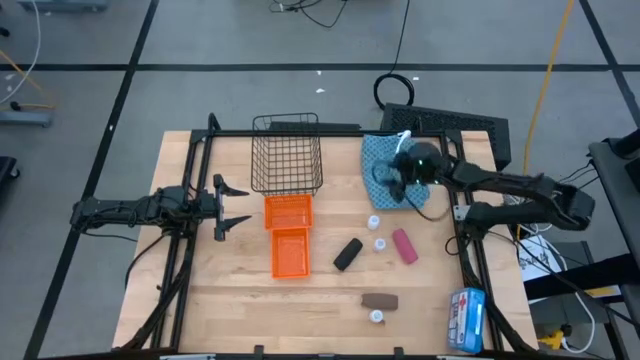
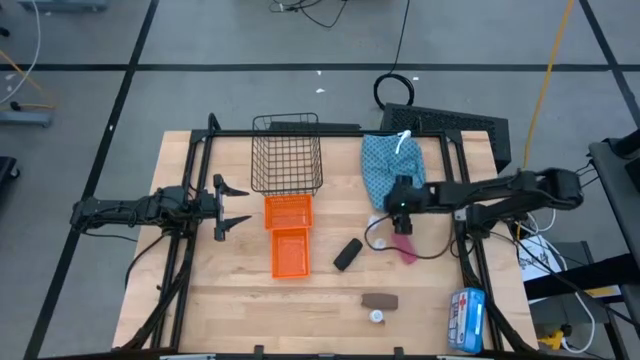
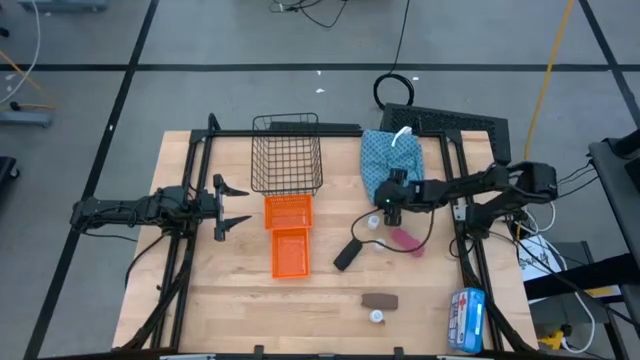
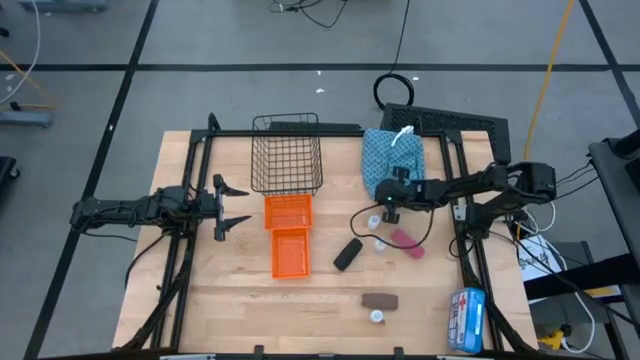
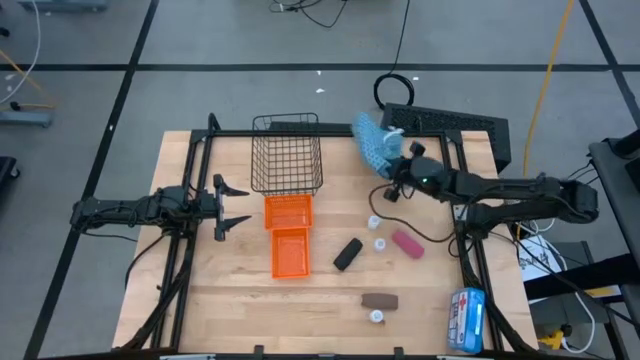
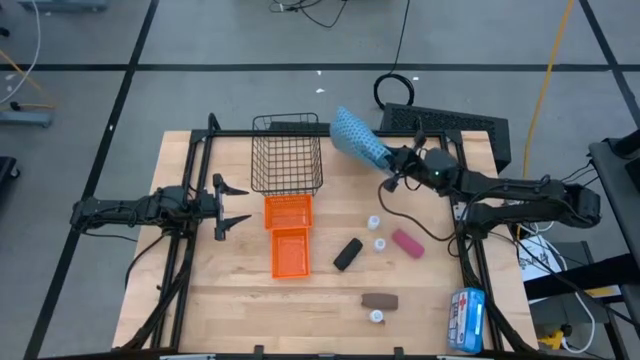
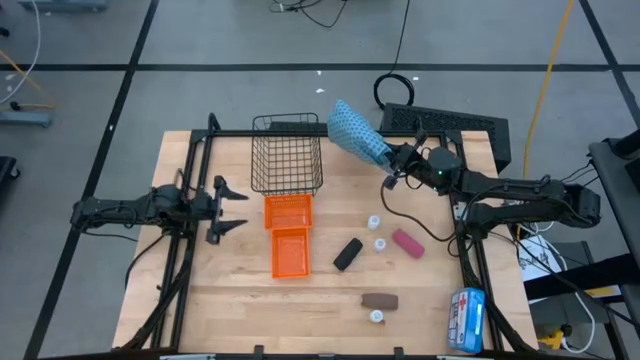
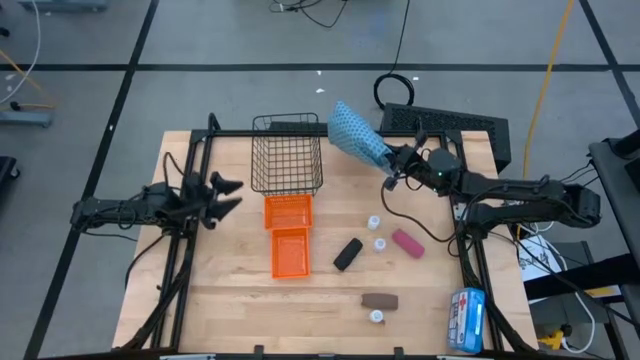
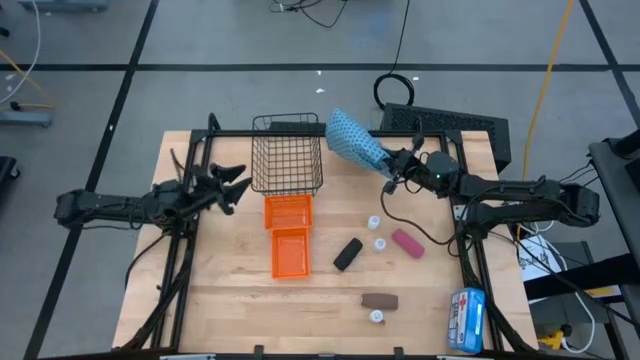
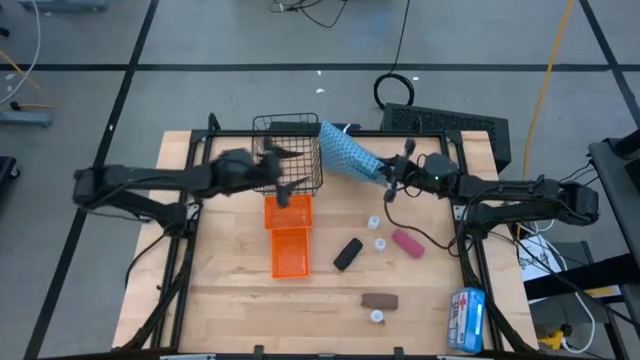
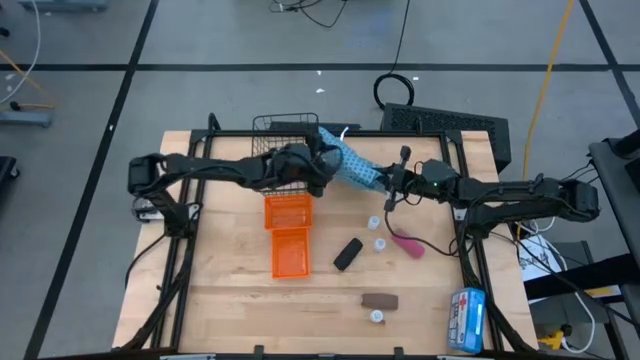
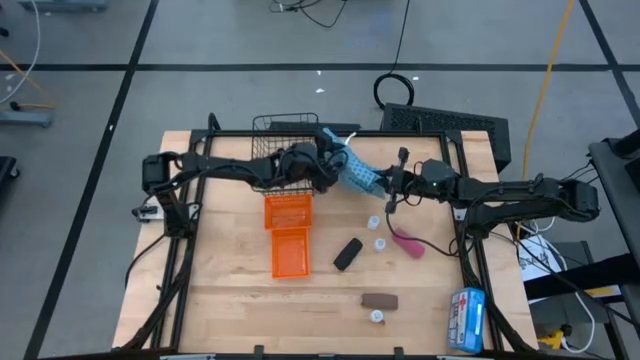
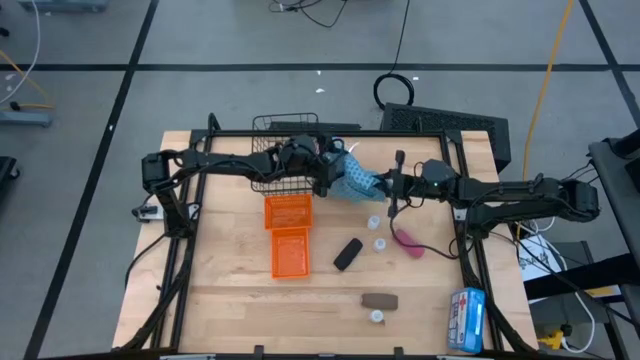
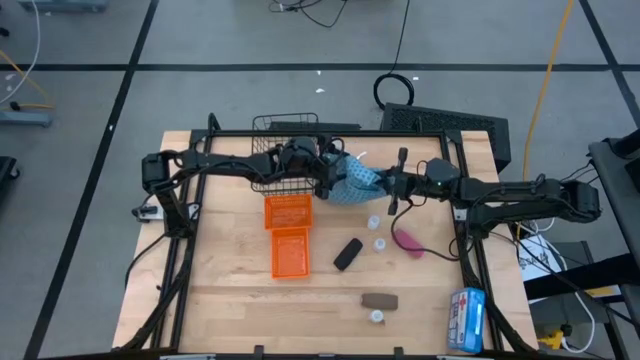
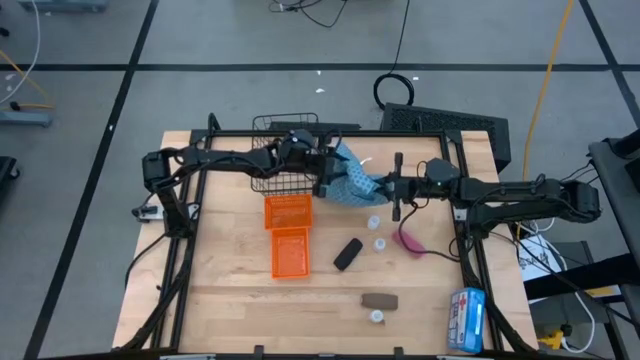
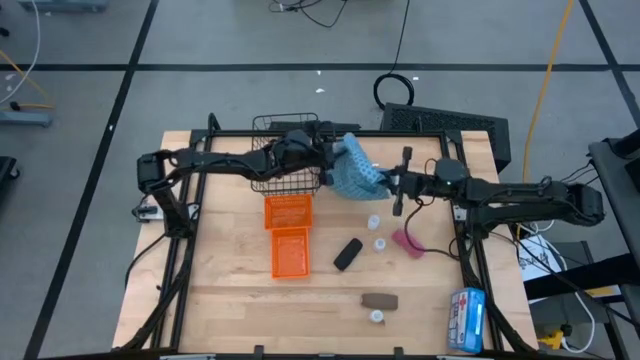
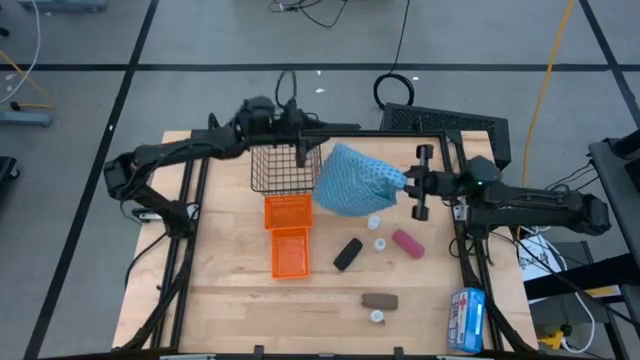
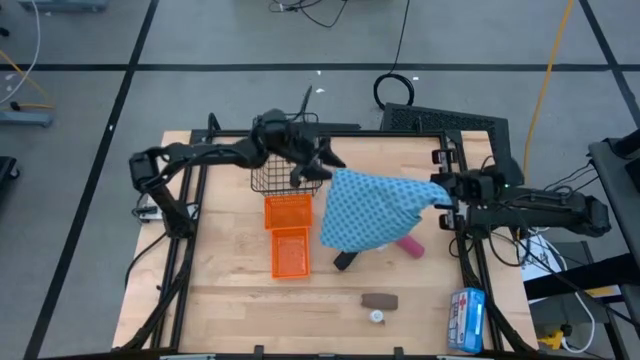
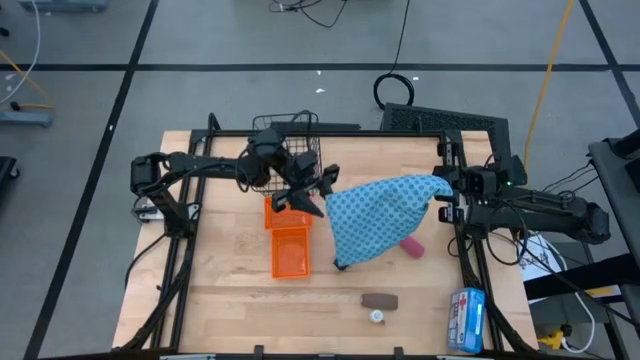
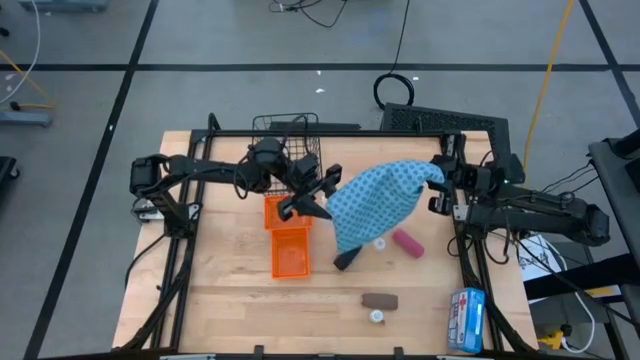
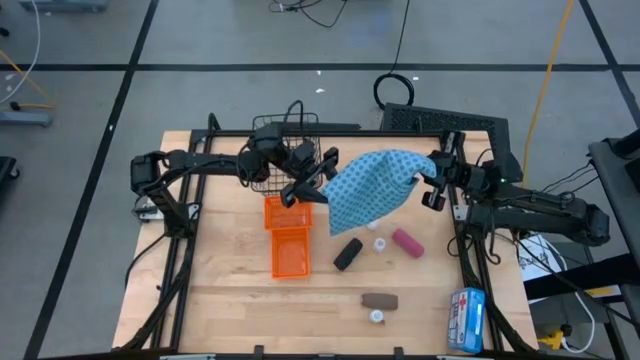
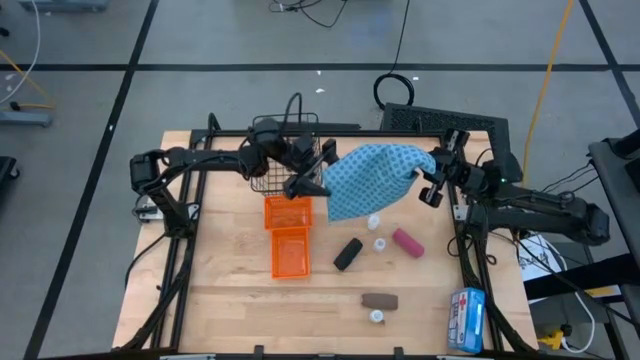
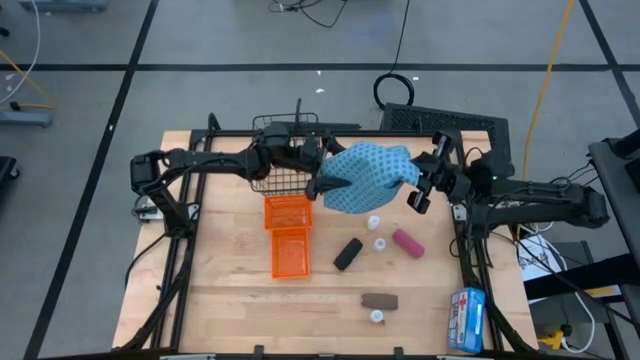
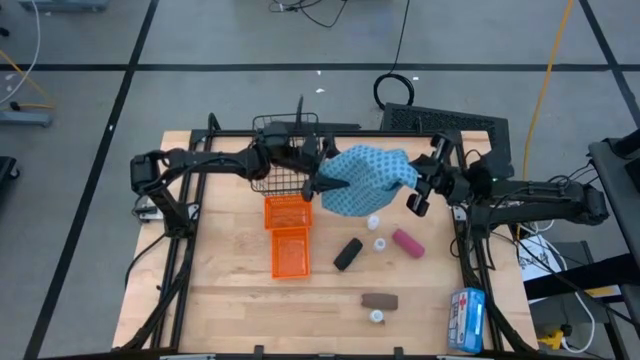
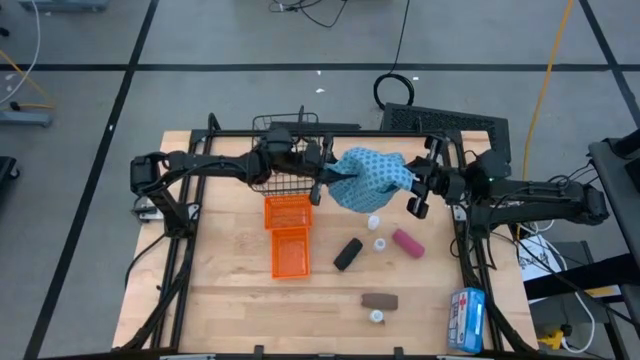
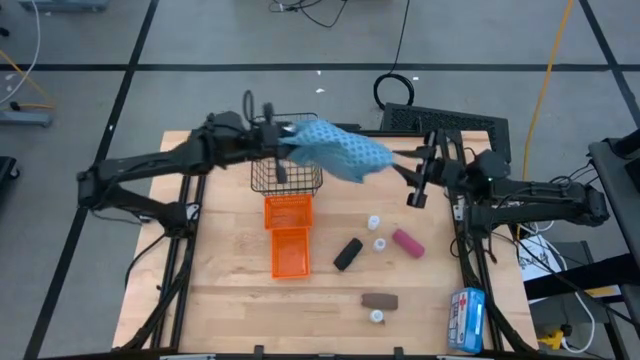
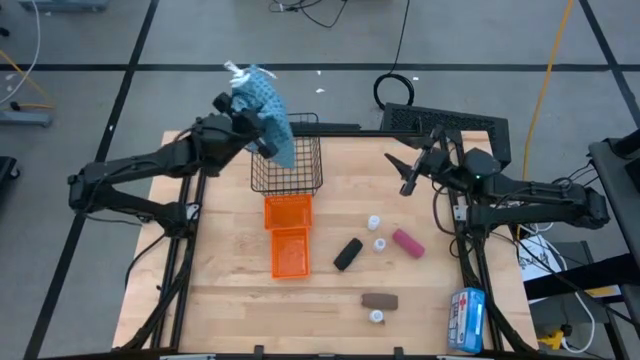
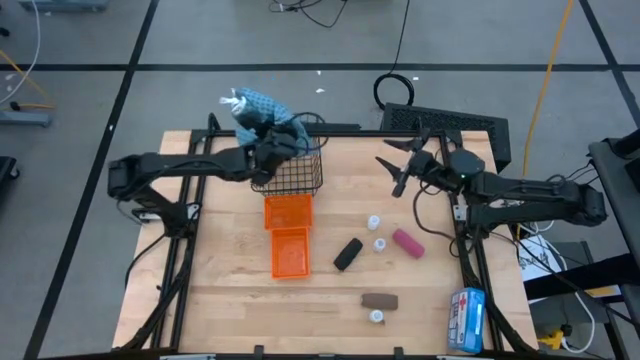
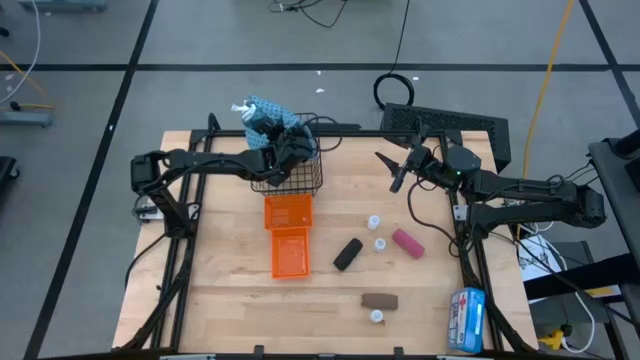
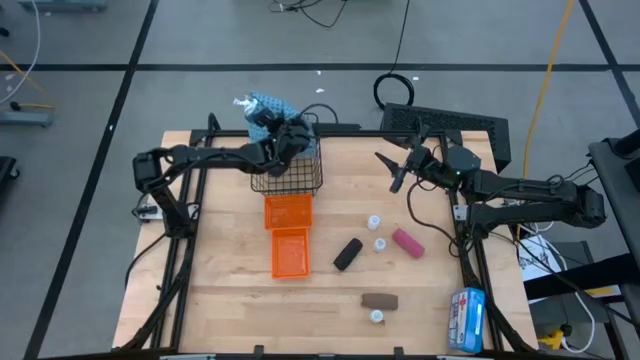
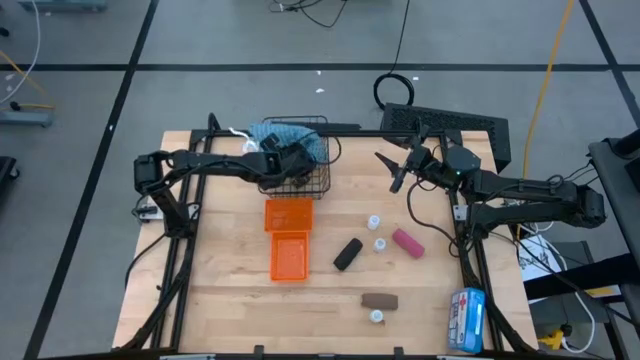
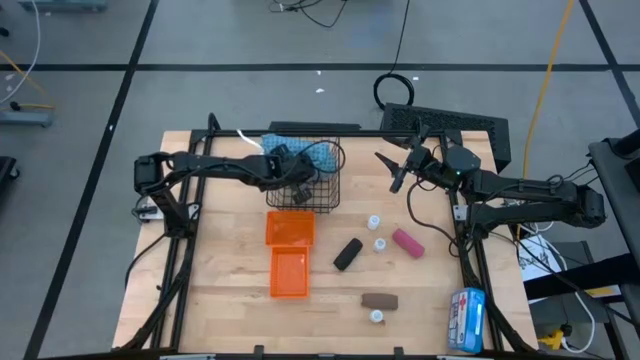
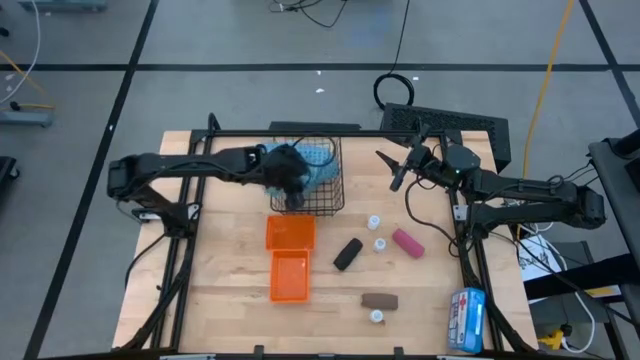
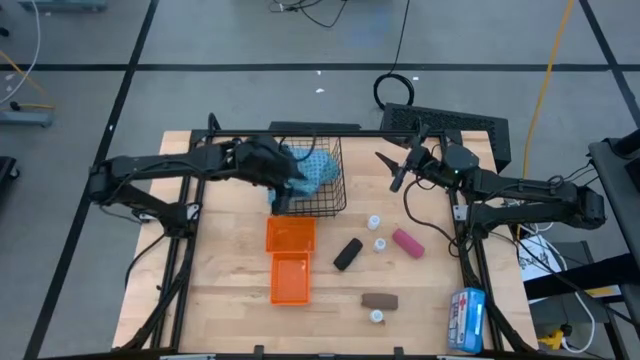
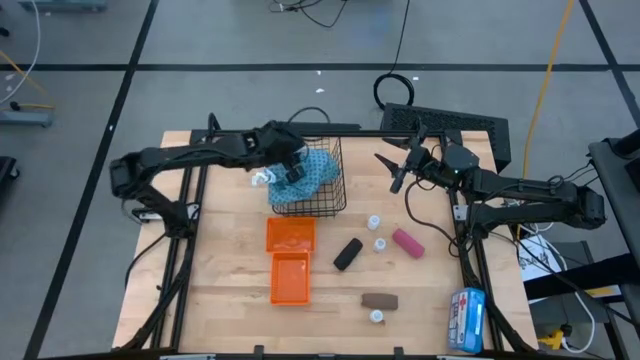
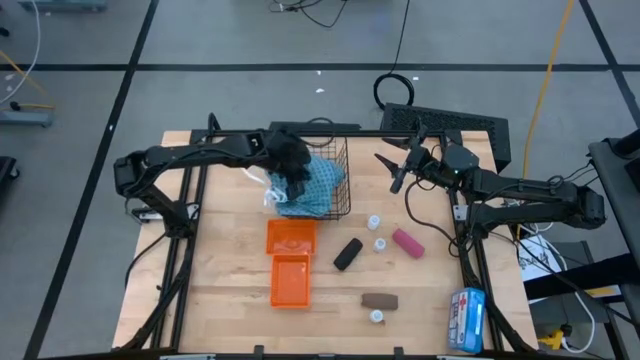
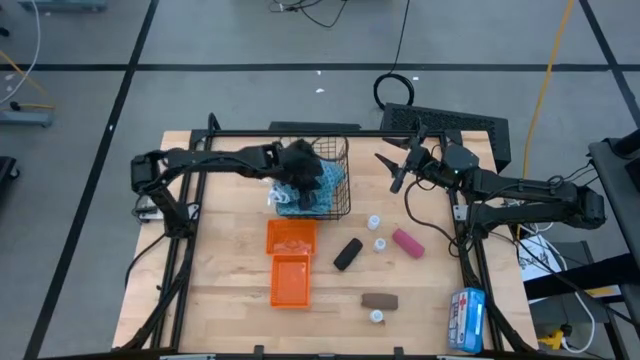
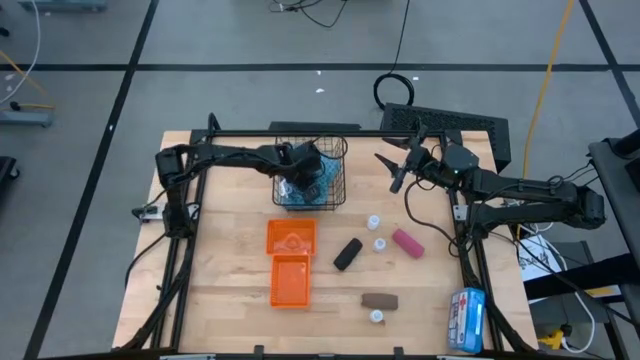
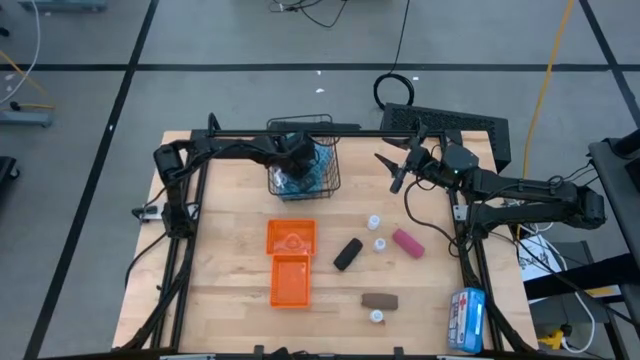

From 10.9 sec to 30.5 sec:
Task: Pick & Place Medicine items
Put the blue patient gown into the black wire basket
